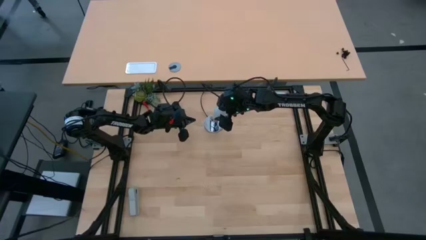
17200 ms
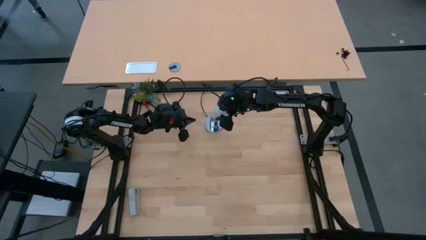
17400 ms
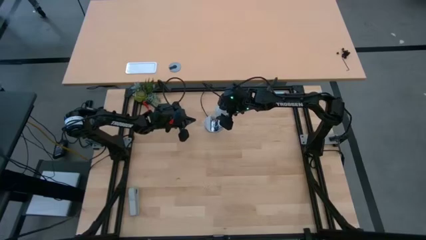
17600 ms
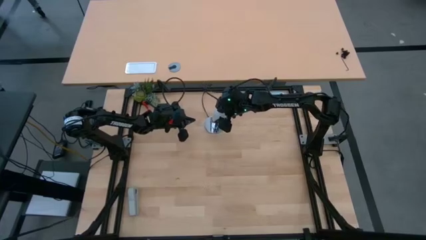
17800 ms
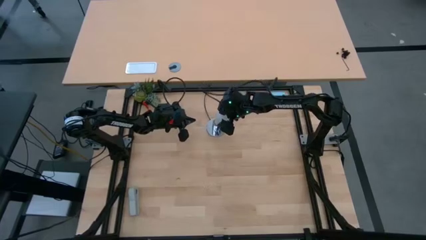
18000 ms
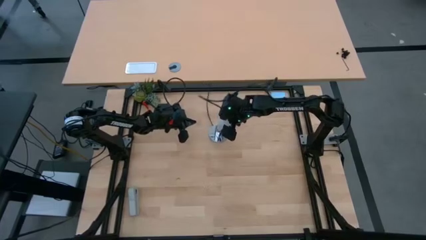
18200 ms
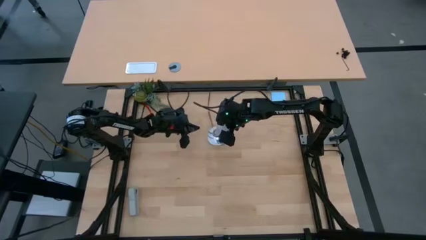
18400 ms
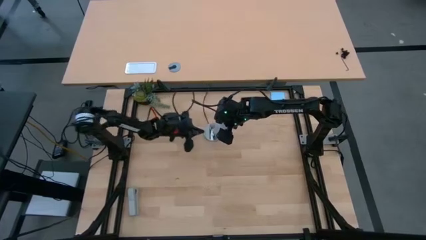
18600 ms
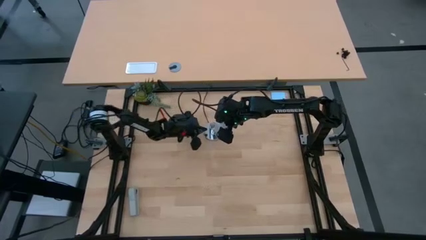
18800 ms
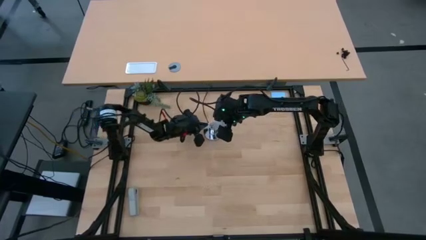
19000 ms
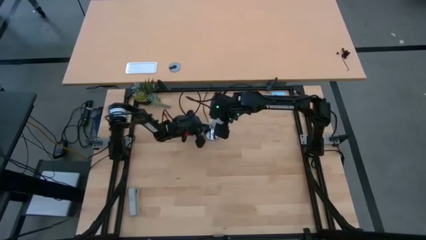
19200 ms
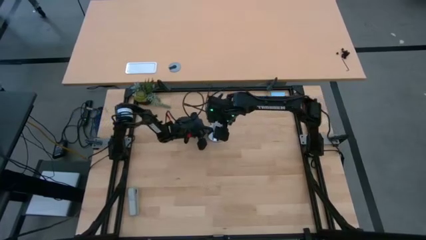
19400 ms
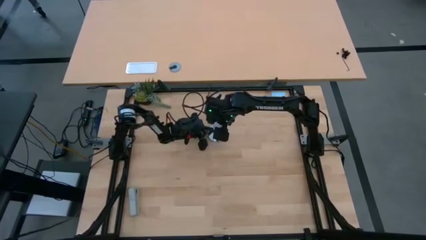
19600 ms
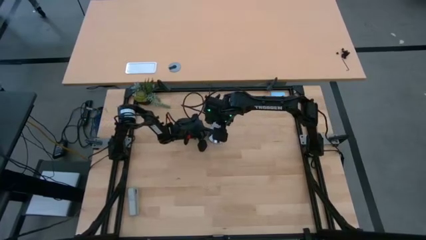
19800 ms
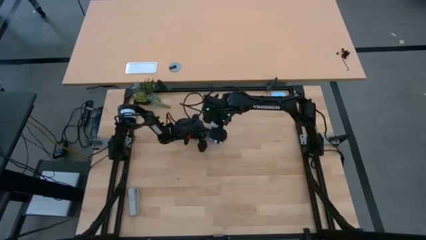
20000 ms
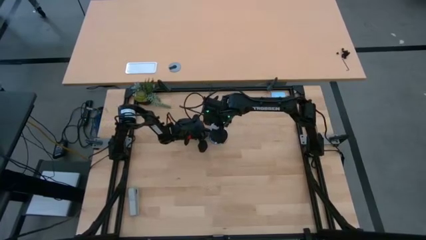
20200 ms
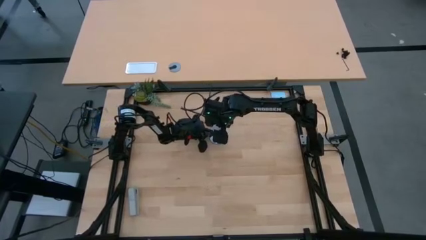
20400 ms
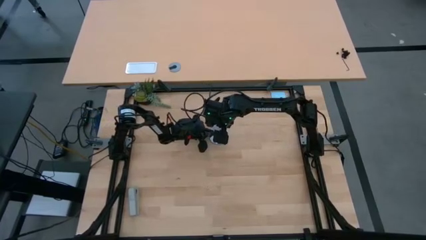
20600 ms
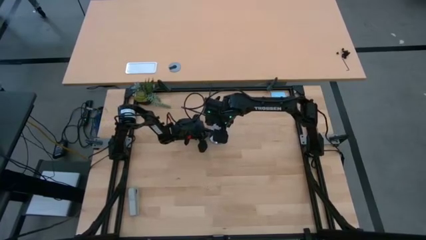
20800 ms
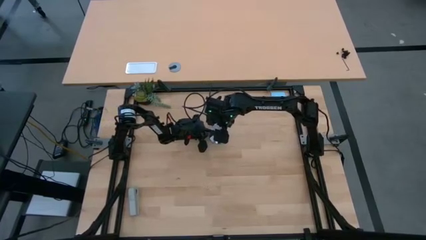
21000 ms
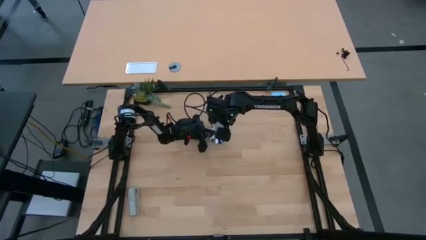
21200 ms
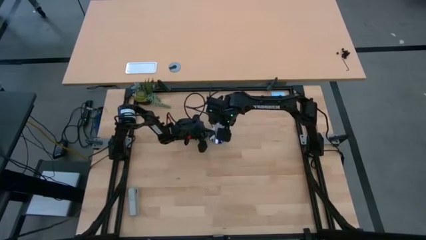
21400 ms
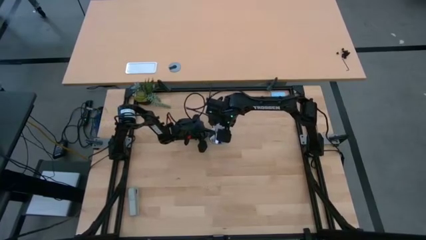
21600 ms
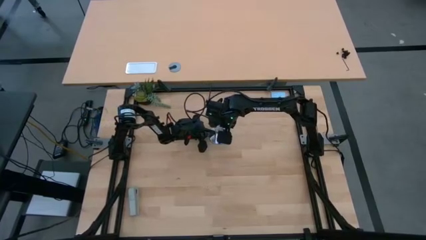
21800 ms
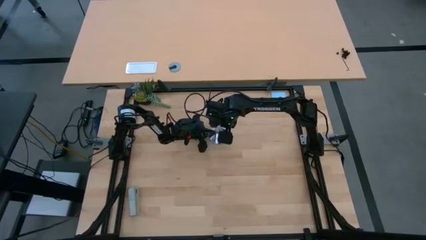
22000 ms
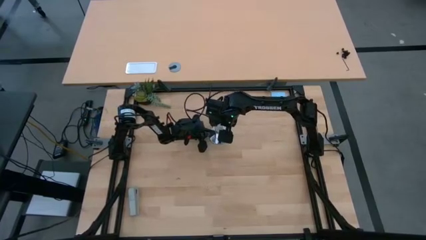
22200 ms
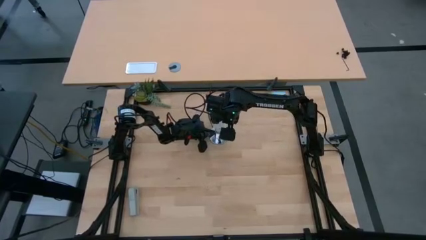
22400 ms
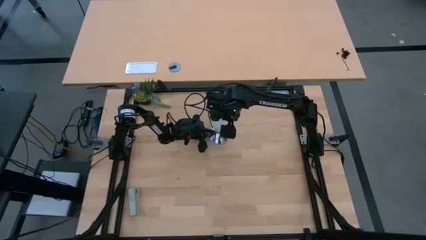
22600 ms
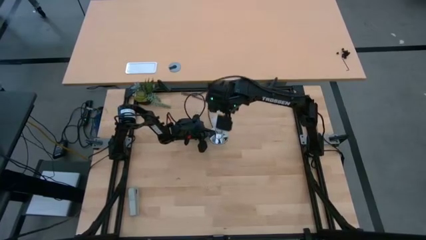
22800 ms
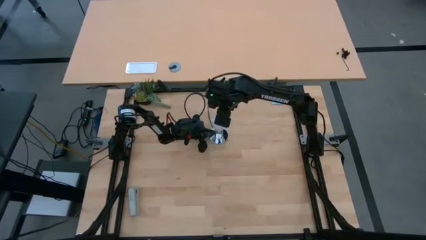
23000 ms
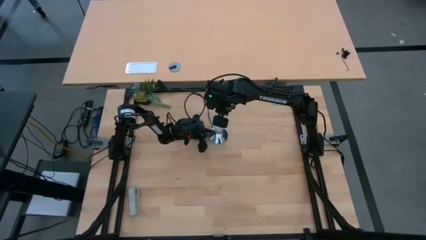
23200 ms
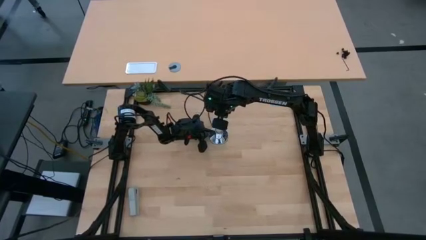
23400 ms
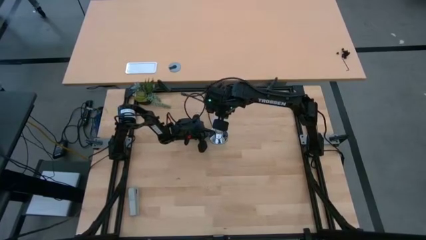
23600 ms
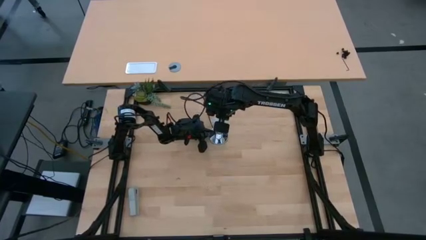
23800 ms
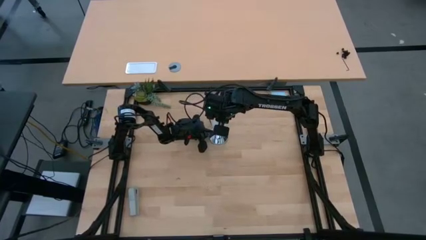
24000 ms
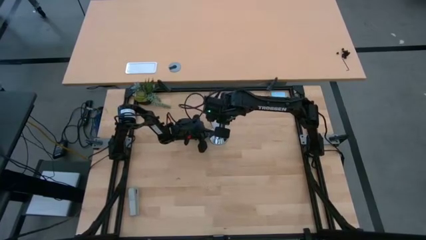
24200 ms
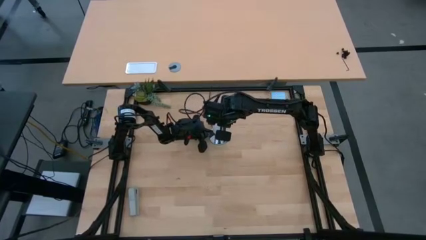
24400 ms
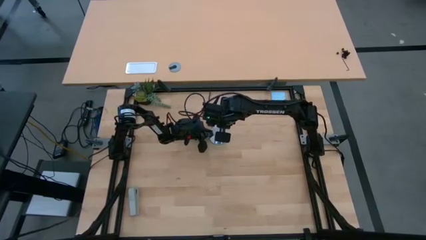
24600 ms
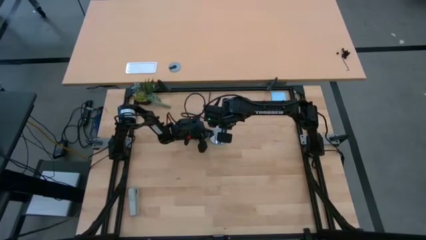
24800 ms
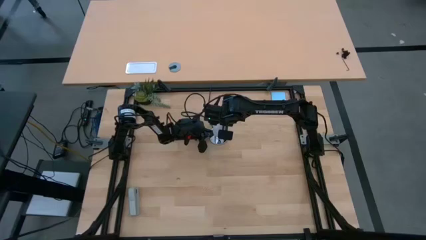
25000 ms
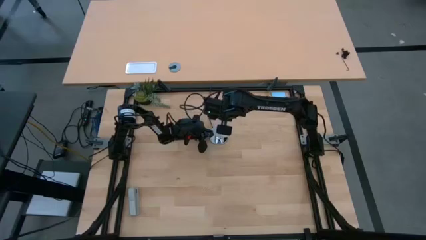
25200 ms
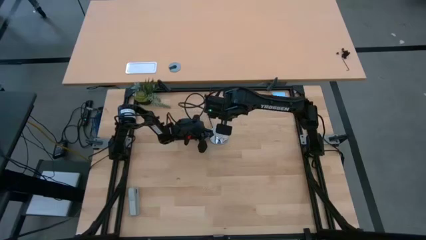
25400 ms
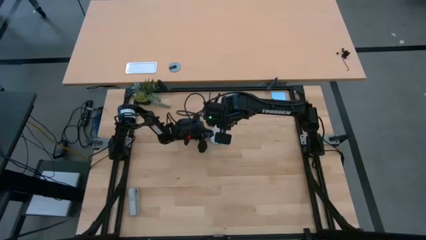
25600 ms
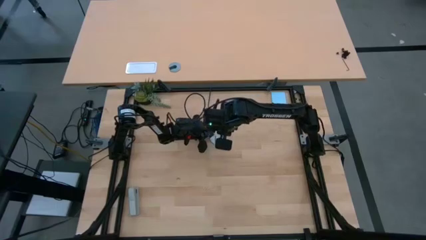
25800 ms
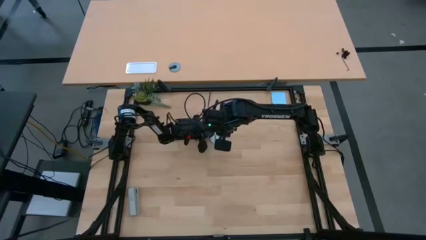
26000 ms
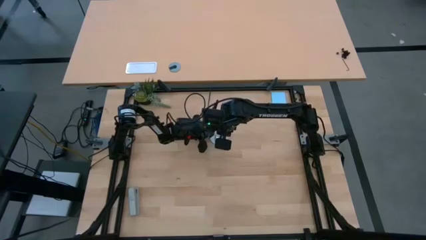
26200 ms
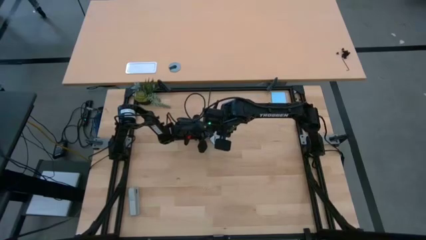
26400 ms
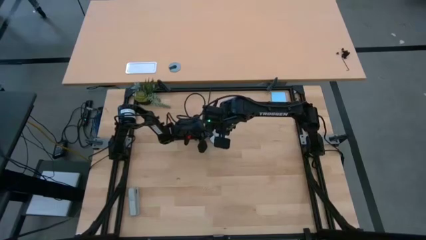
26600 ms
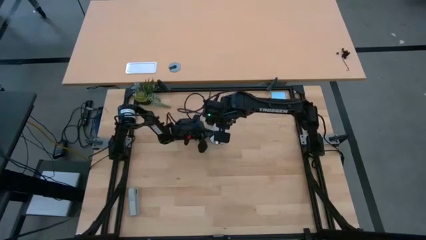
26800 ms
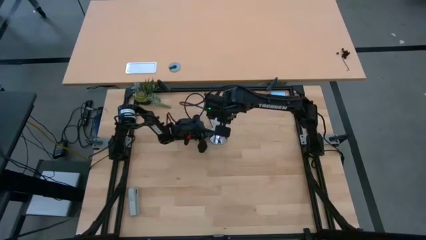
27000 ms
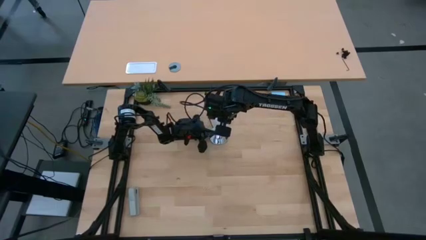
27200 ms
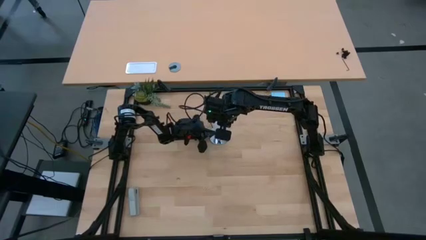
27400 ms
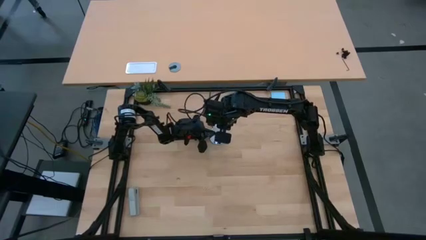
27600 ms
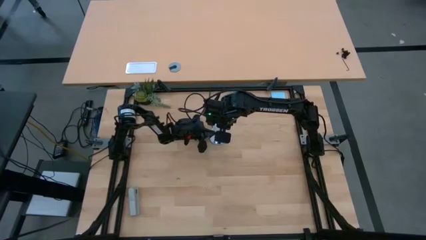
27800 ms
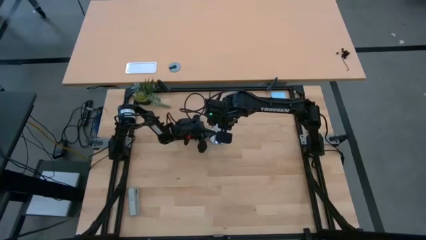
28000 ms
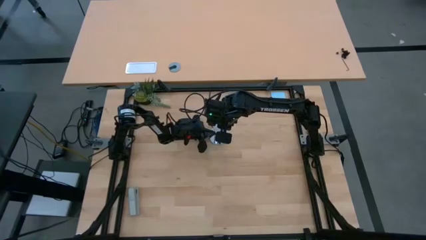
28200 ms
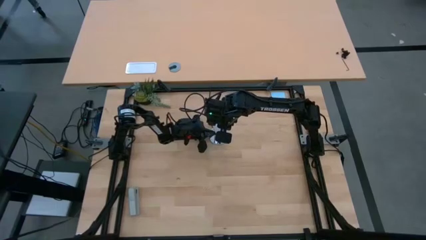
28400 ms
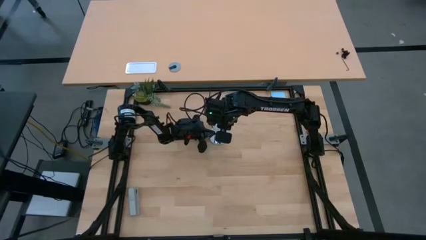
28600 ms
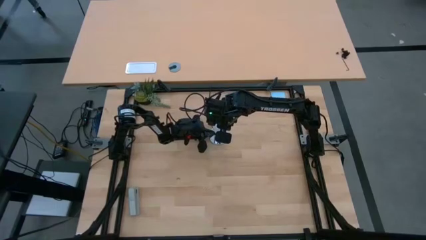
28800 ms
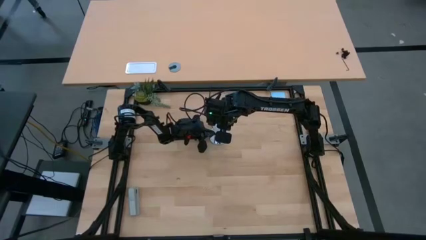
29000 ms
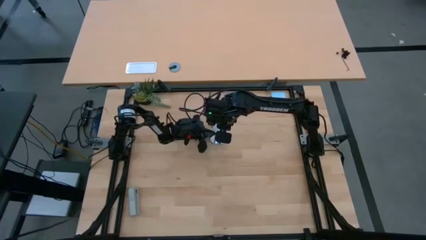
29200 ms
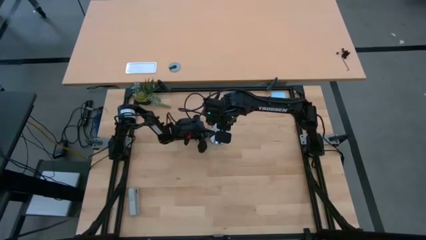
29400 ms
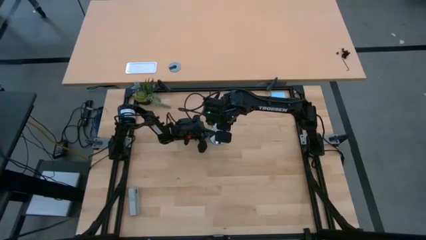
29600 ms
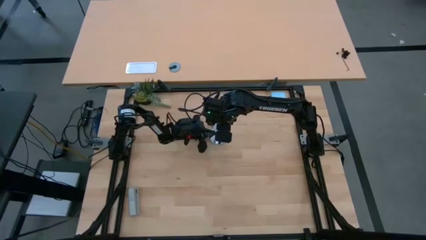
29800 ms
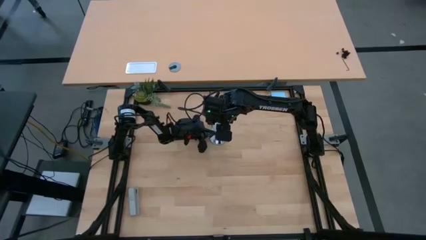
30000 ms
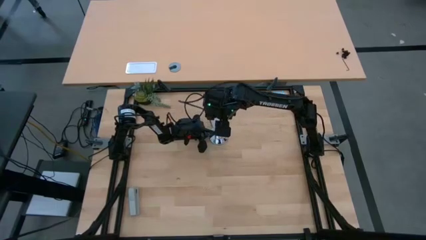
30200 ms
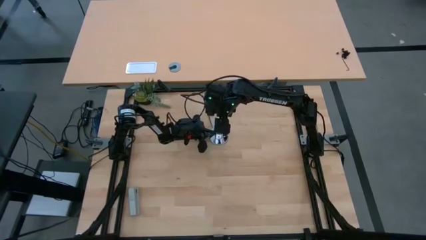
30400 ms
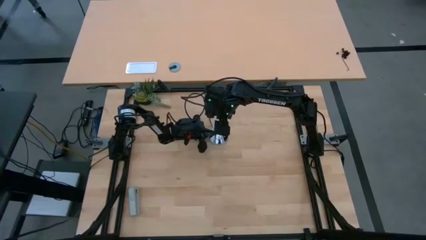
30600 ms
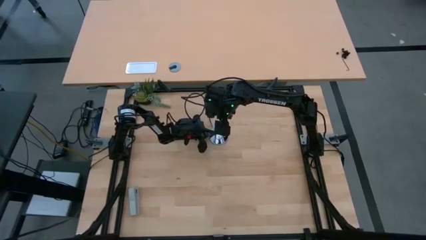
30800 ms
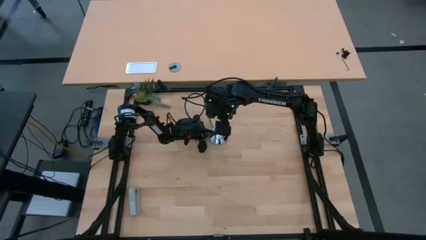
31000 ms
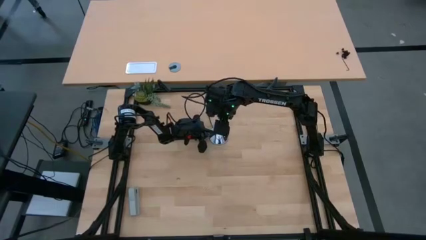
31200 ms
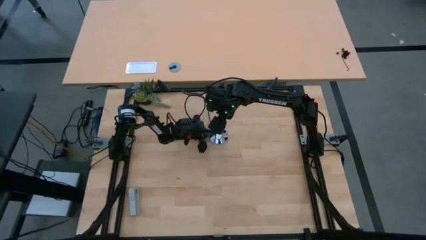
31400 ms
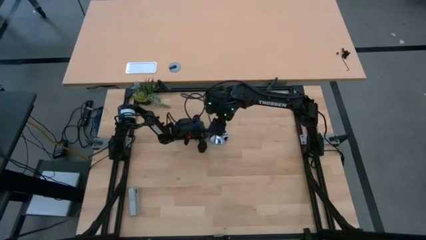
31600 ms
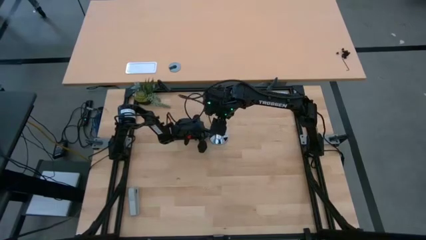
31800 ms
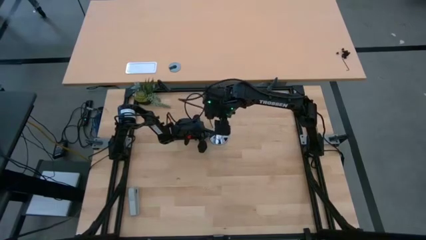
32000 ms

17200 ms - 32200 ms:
Task: Screw lightbulb
Insert the white lightbulb into the silver lamp
